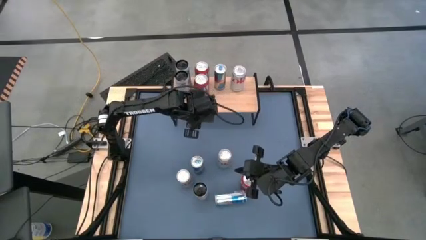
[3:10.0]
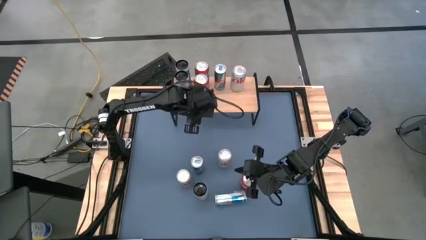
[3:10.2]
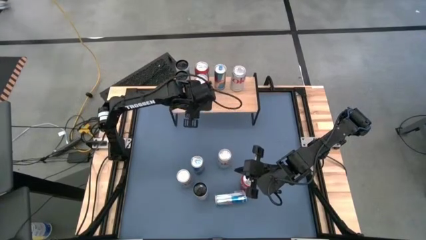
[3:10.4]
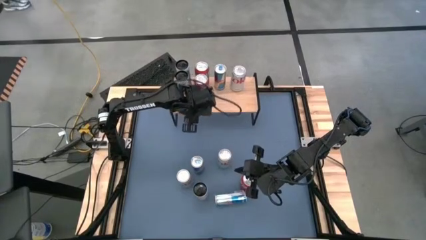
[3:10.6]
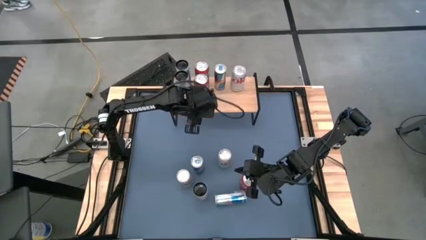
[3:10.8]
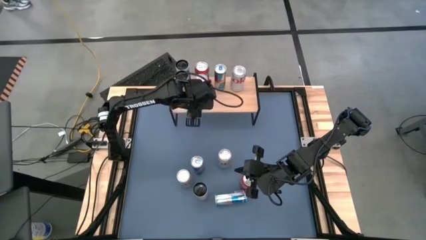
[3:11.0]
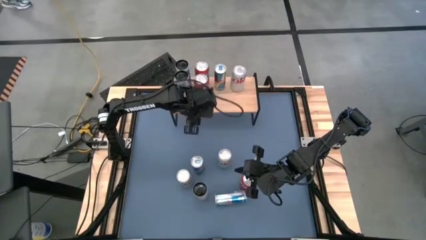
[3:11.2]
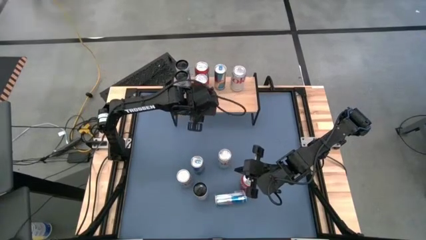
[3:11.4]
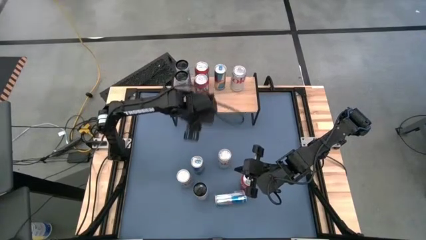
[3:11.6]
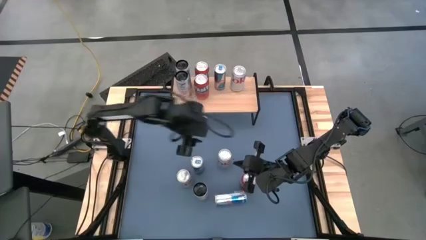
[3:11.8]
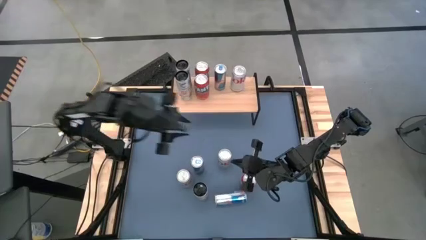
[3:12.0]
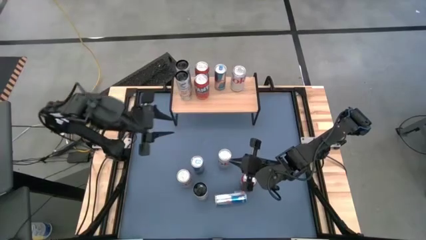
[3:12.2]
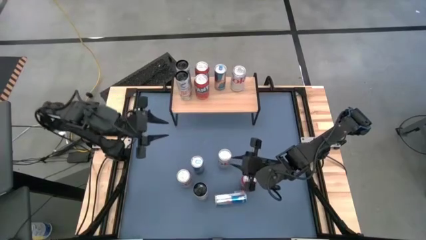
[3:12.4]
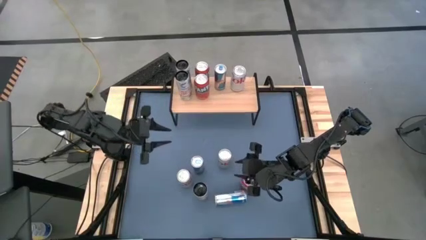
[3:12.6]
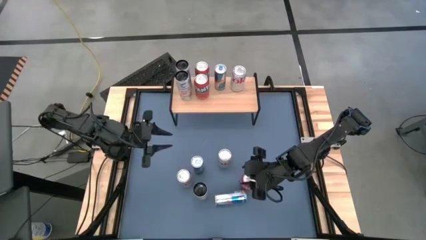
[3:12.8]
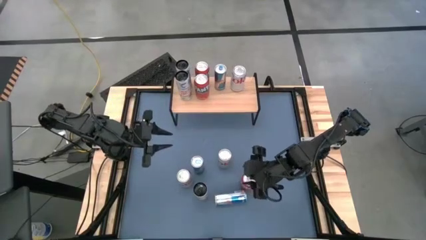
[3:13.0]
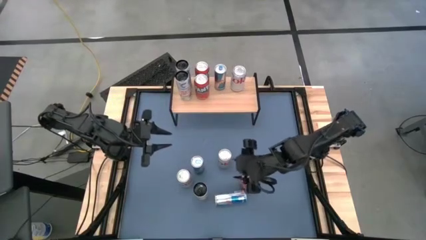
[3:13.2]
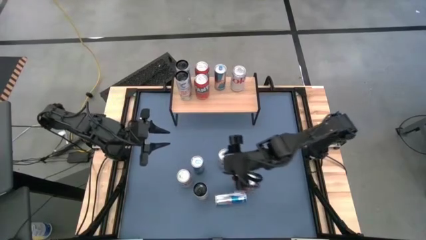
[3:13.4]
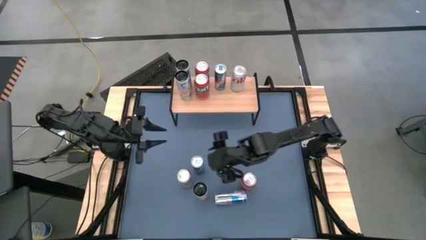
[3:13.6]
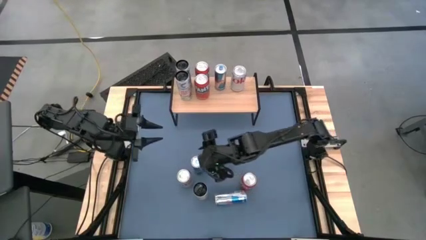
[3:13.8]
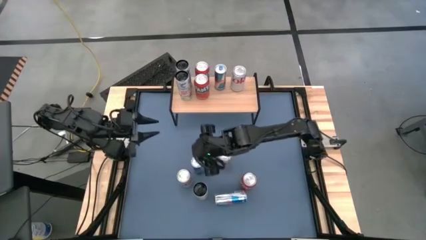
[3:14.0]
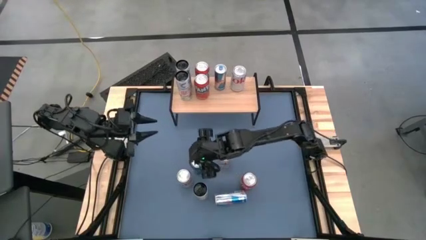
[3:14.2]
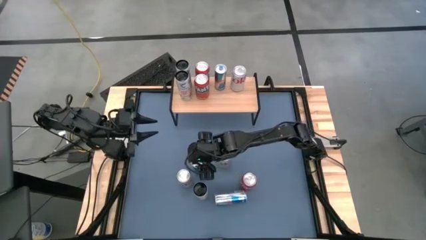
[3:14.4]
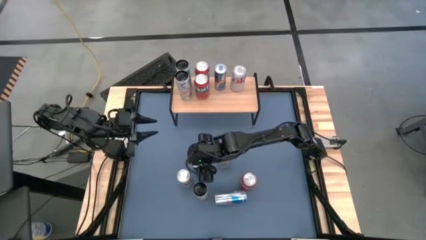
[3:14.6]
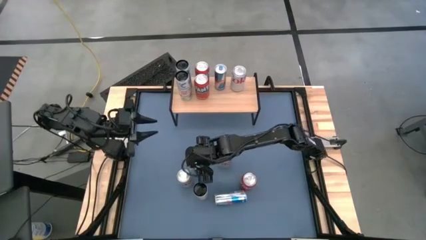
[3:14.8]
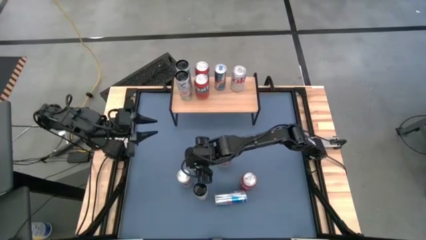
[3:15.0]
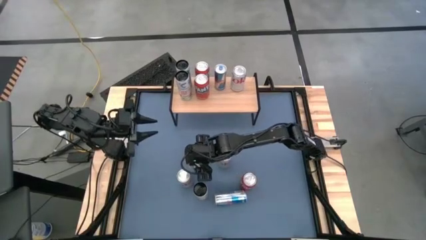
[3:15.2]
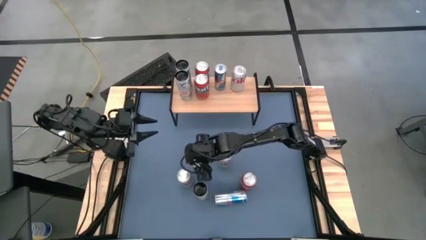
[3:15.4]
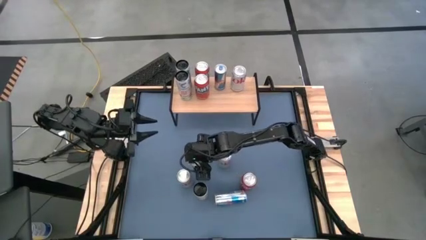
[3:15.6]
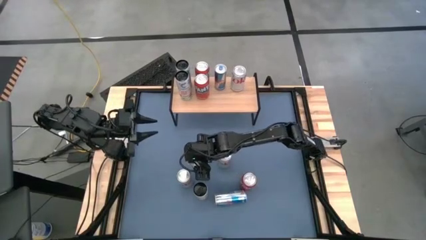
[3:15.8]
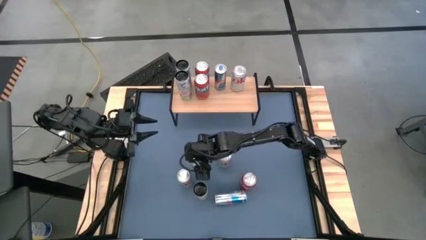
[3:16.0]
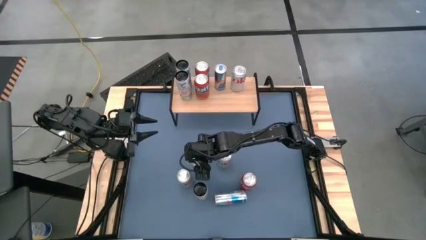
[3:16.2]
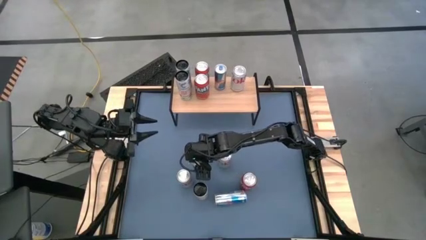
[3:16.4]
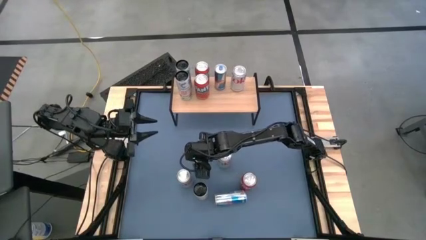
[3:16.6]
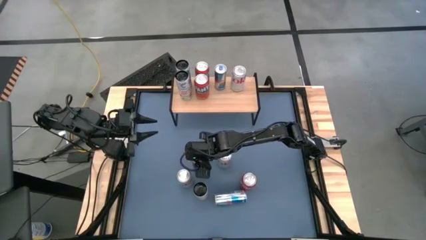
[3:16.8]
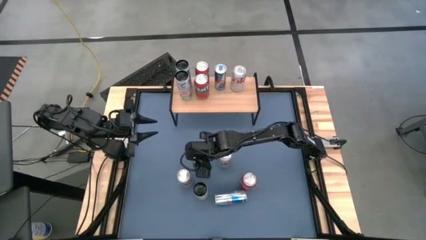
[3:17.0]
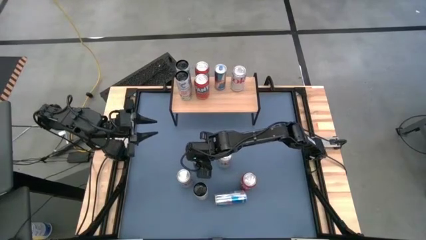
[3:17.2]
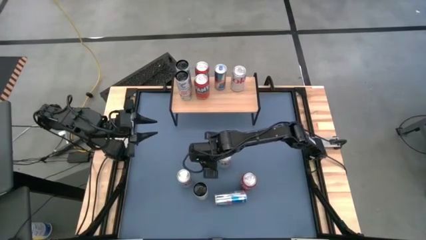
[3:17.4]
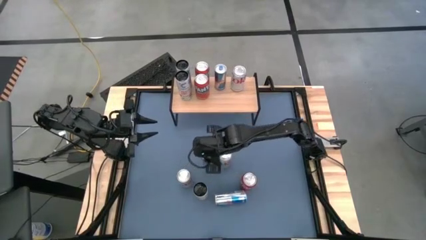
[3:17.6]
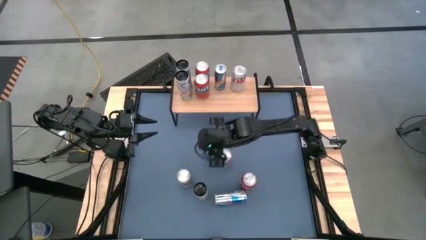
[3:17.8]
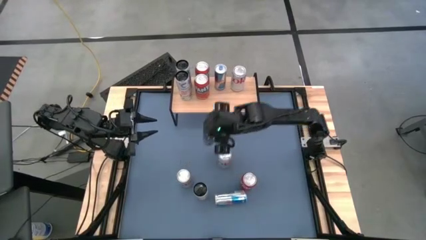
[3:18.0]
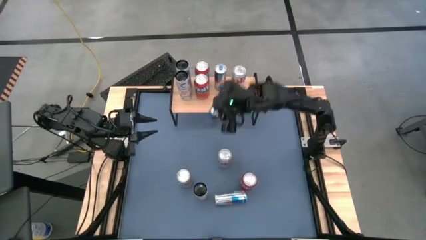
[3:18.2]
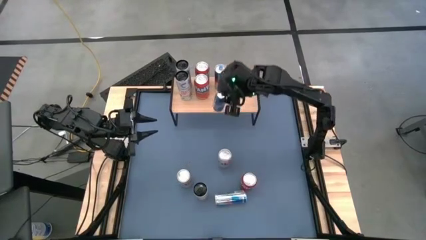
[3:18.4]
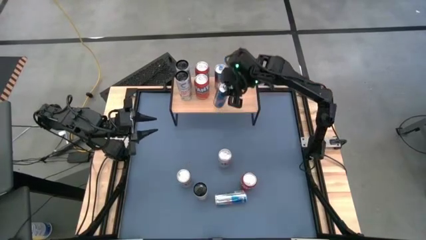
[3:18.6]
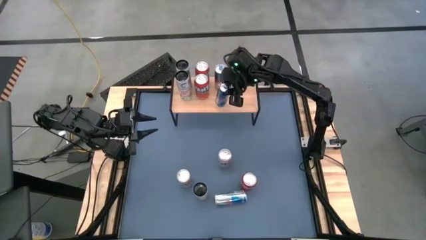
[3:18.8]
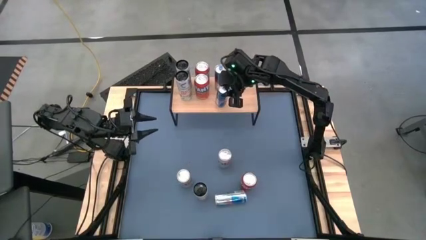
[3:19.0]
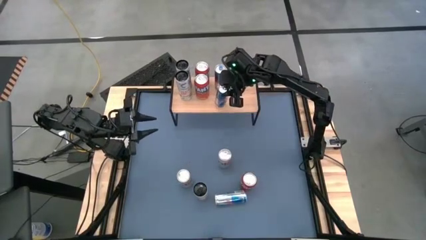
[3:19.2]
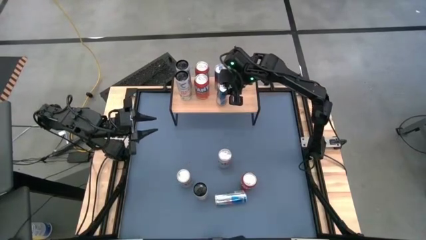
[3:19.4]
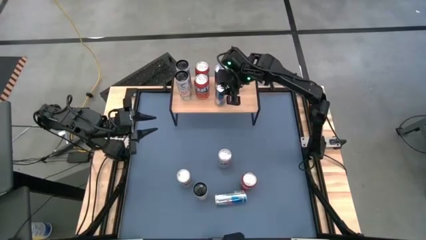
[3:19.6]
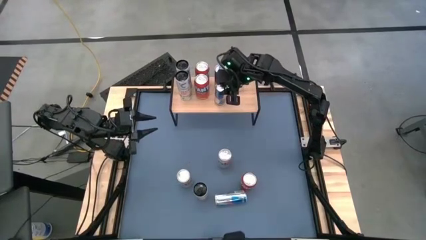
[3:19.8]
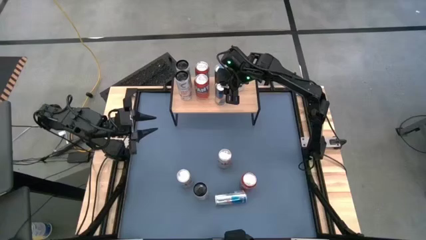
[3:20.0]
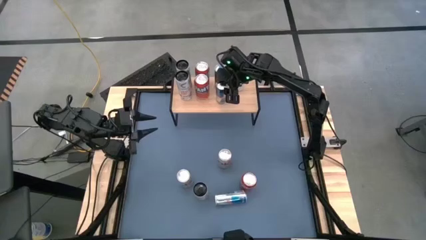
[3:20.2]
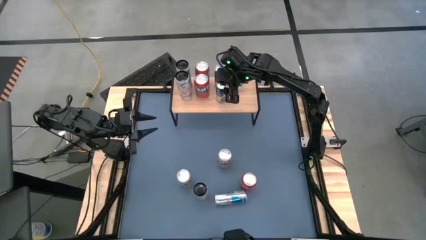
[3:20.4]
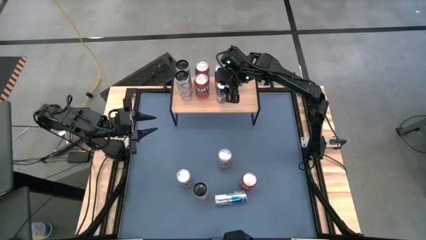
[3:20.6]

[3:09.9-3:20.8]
Task: Place canned beverage on shelf
Put the top blue soda can on the shelf

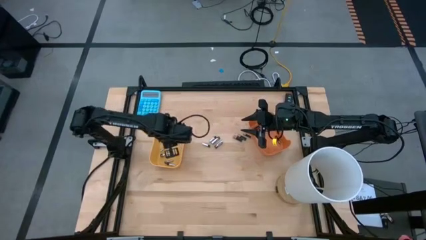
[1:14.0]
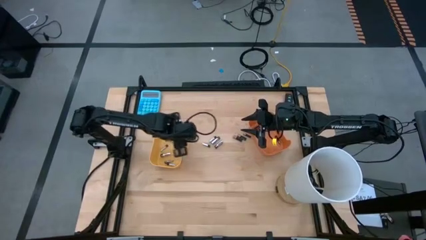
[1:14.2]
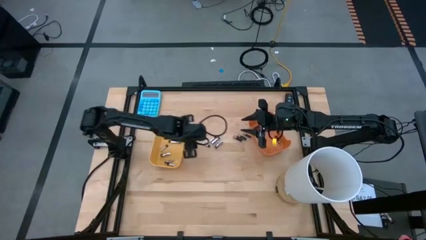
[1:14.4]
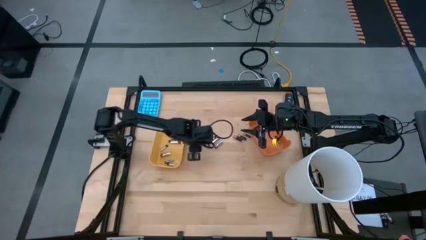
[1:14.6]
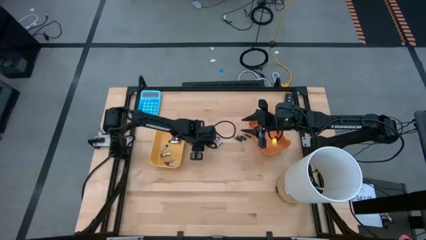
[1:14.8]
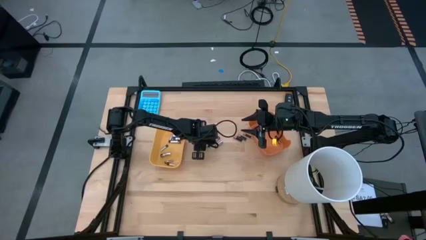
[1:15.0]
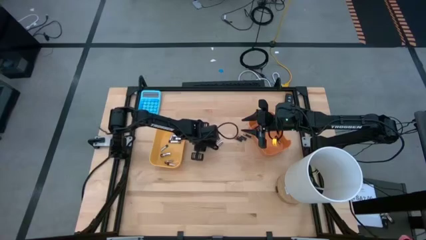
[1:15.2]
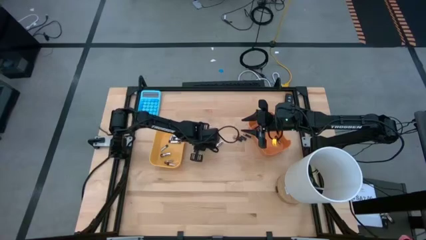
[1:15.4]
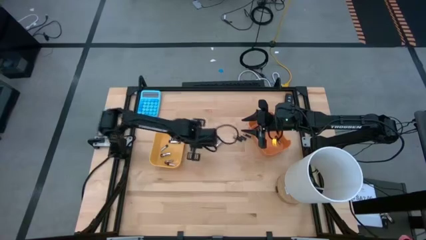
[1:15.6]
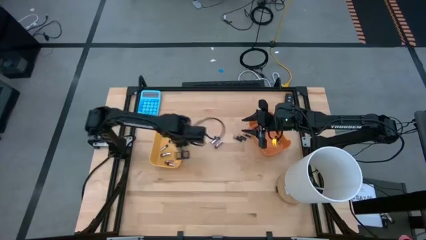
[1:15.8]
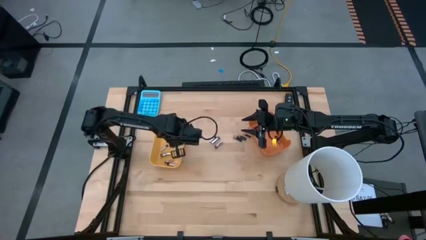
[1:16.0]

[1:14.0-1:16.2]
Task: Sort batteries
Put the silver battery into the yellow bin

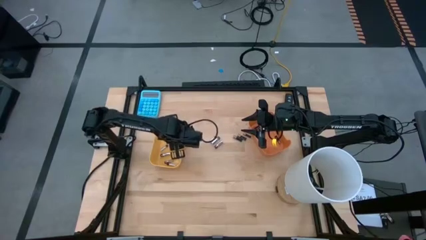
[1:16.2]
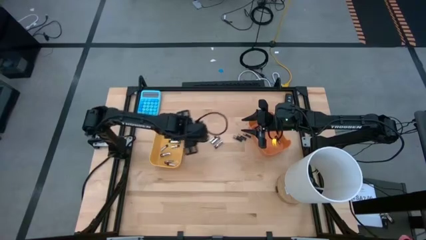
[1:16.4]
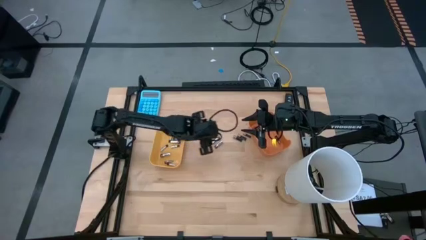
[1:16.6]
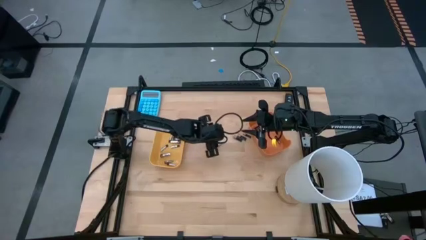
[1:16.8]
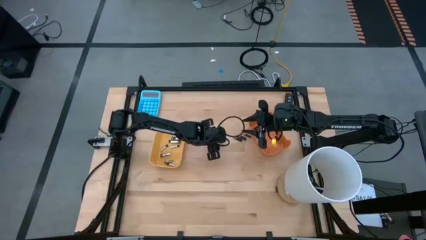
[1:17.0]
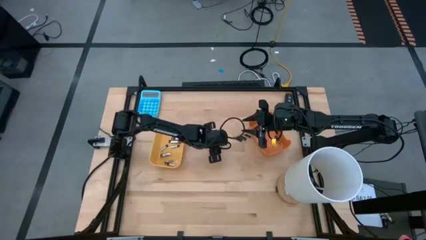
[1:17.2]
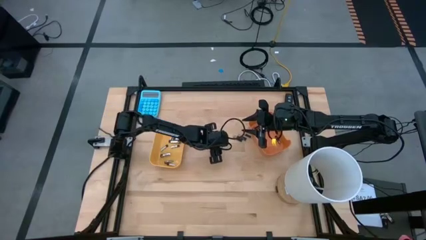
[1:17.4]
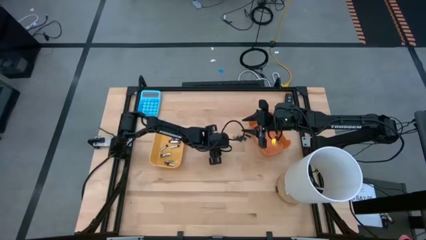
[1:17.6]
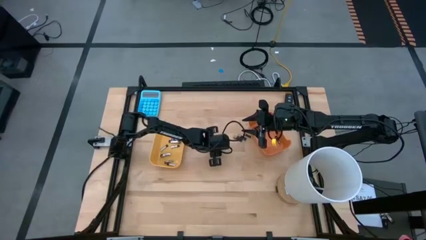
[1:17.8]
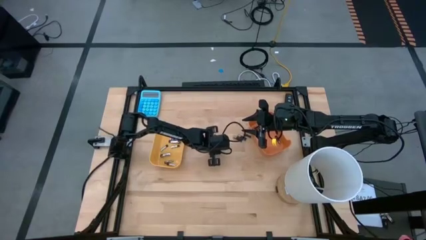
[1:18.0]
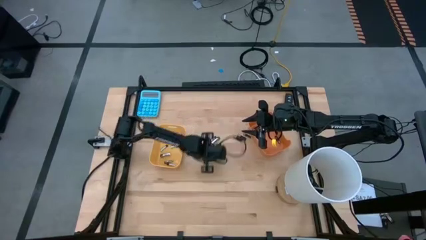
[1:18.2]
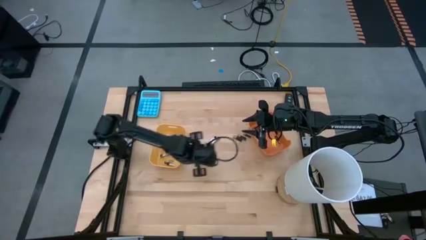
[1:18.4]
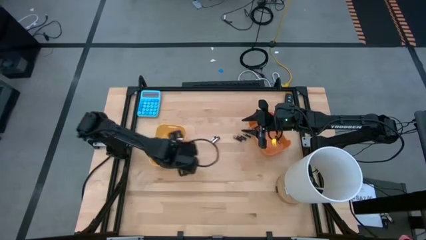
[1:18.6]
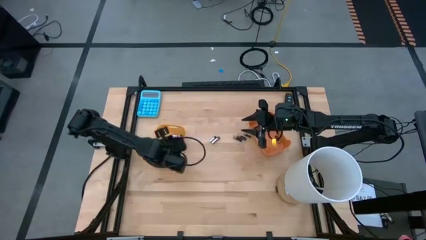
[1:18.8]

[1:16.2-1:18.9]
Put the silver battery into the yellow bin

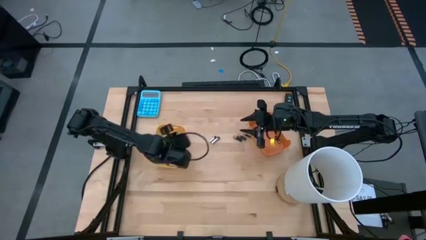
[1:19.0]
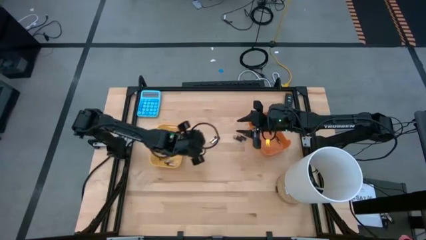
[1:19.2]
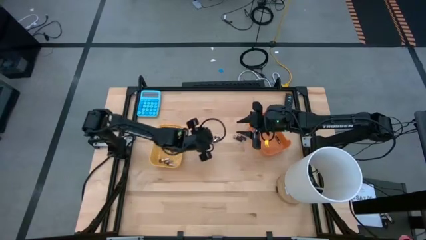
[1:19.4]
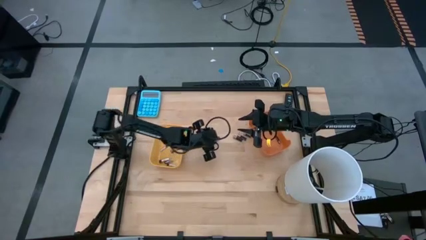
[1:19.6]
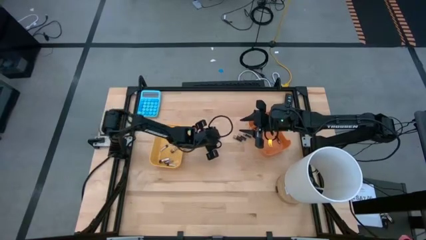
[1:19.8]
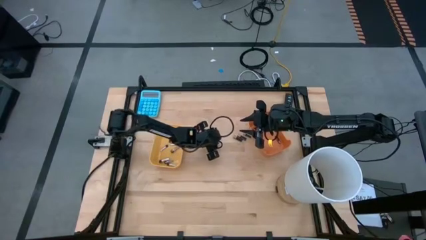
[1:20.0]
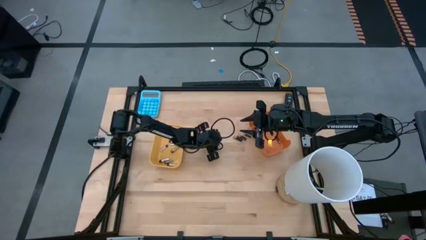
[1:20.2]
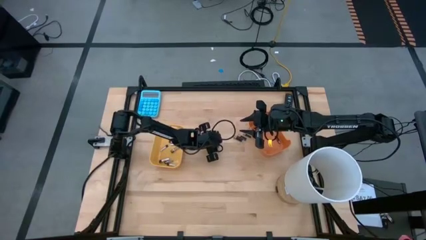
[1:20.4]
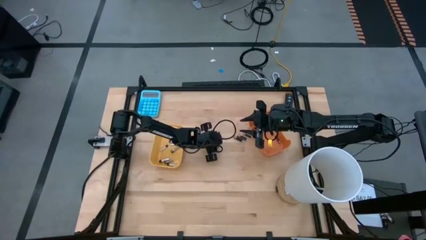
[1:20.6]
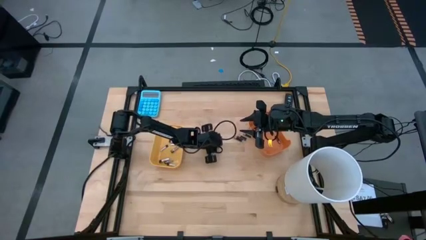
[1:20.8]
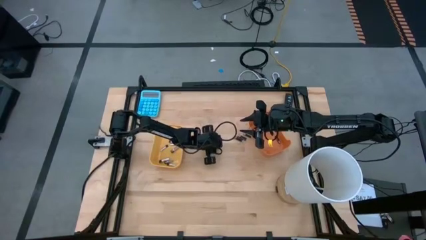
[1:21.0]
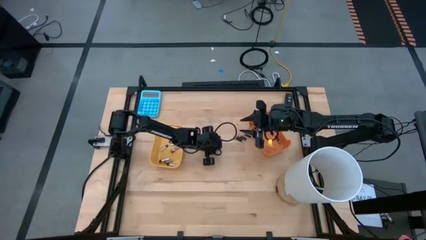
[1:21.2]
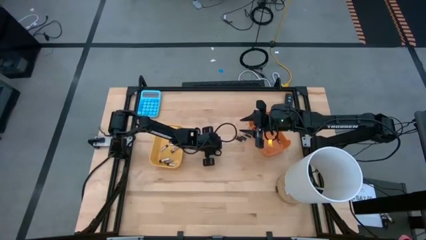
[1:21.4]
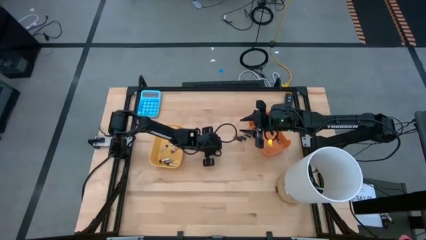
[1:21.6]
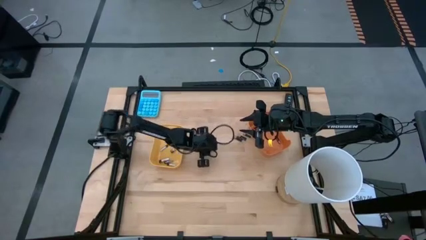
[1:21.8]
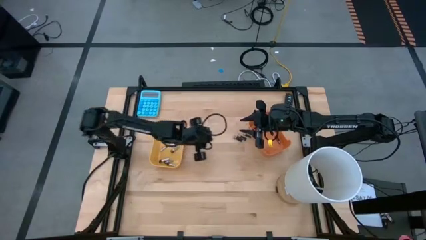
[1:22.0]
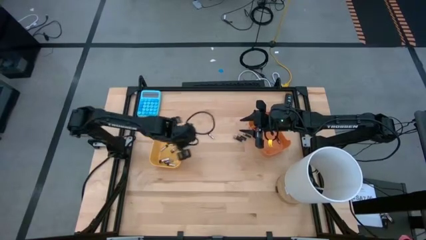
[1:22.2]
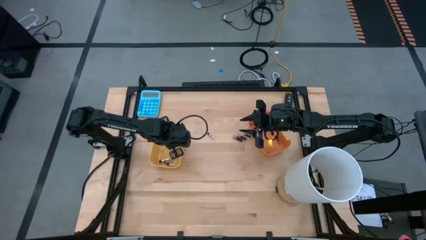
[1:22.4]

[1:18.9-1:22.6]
Put the silver battery into the yellow bin
